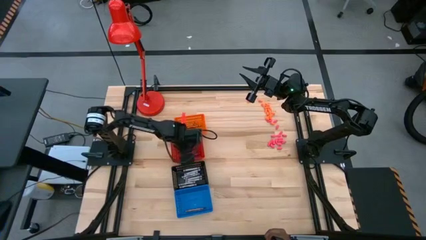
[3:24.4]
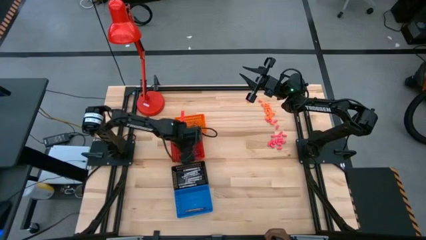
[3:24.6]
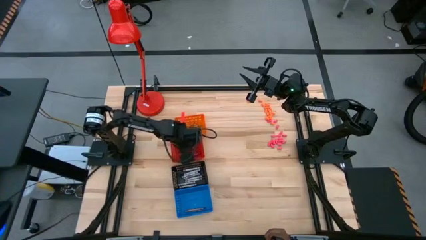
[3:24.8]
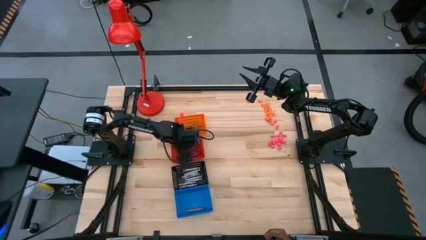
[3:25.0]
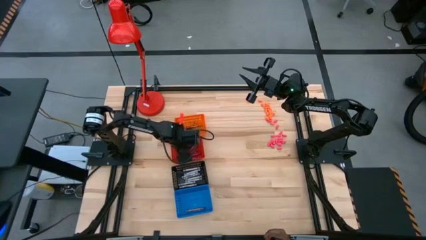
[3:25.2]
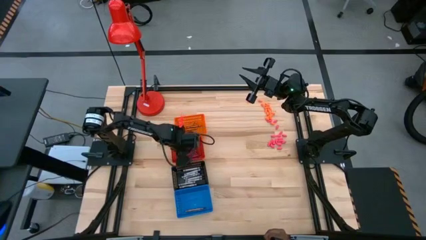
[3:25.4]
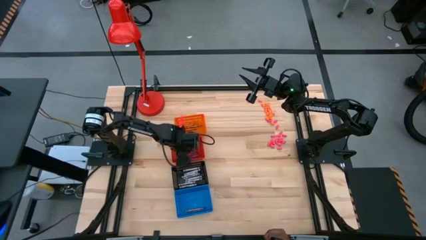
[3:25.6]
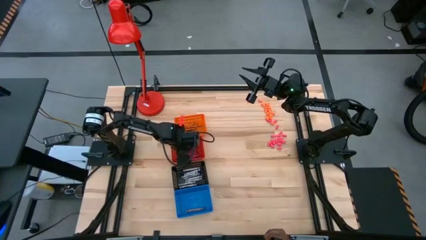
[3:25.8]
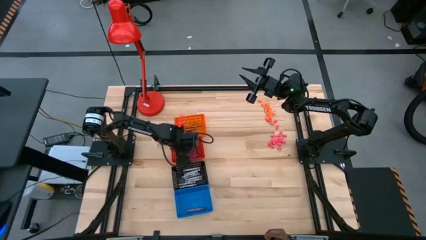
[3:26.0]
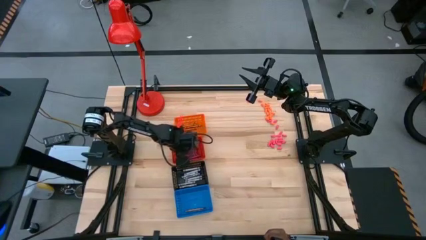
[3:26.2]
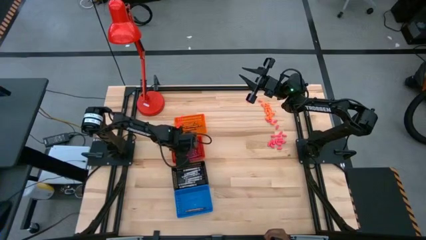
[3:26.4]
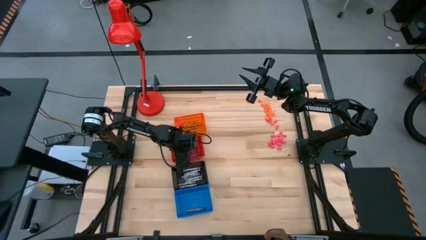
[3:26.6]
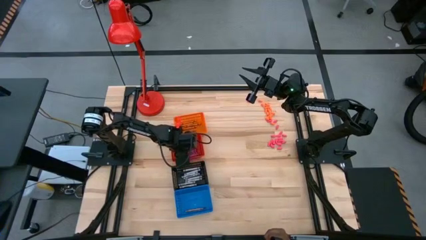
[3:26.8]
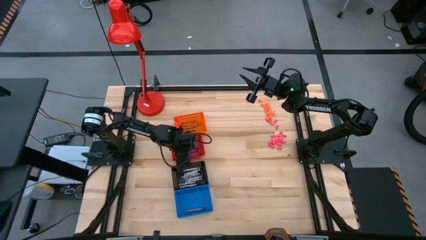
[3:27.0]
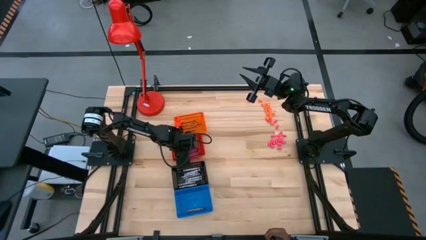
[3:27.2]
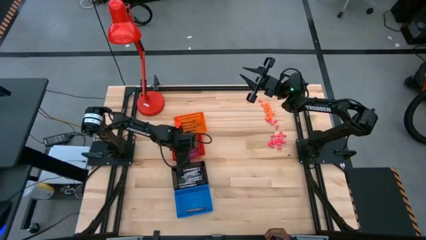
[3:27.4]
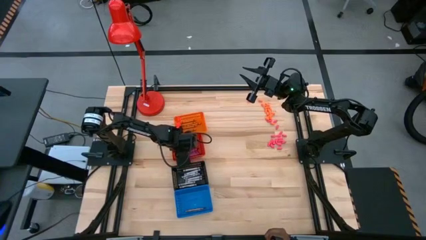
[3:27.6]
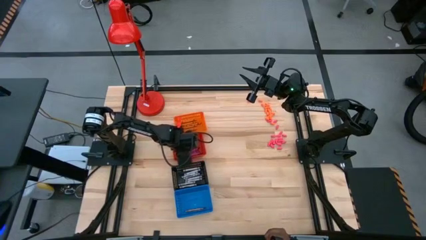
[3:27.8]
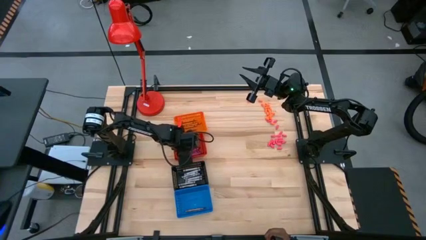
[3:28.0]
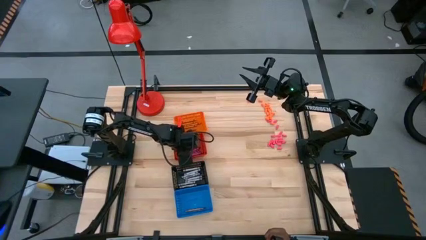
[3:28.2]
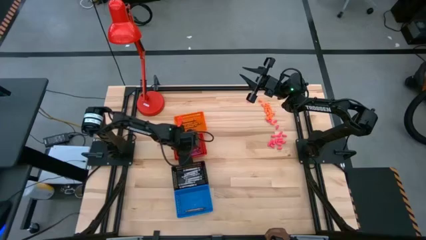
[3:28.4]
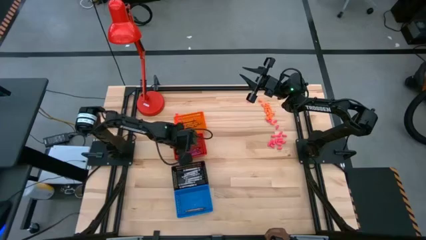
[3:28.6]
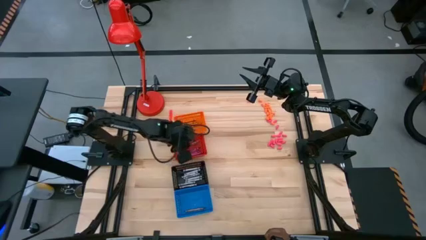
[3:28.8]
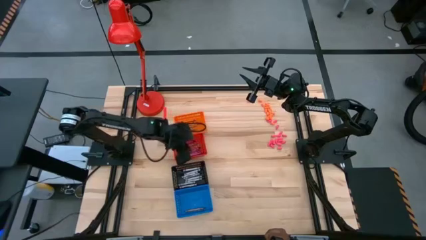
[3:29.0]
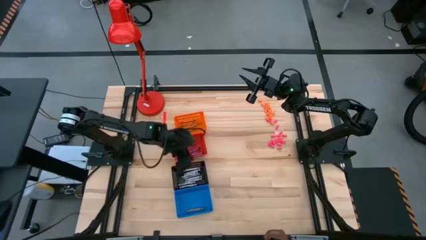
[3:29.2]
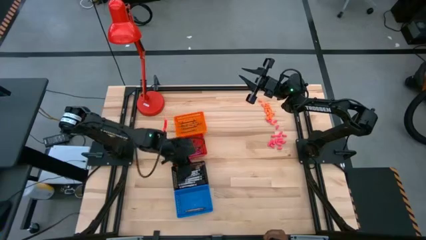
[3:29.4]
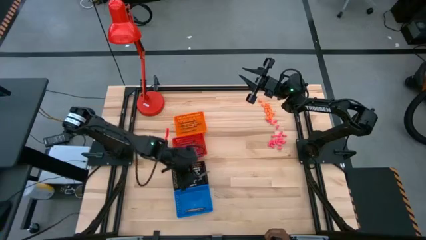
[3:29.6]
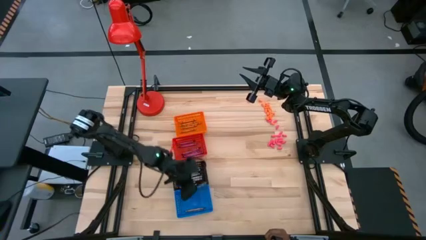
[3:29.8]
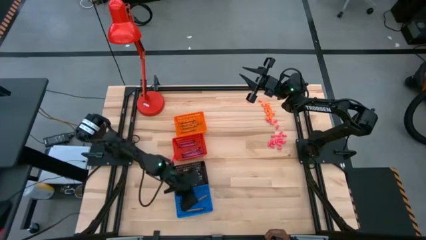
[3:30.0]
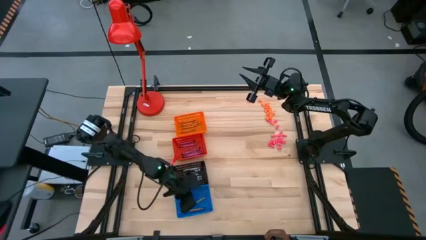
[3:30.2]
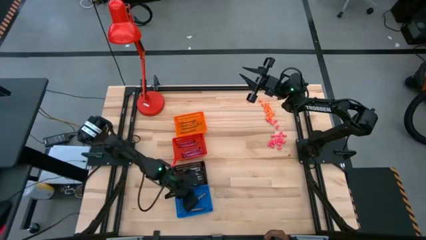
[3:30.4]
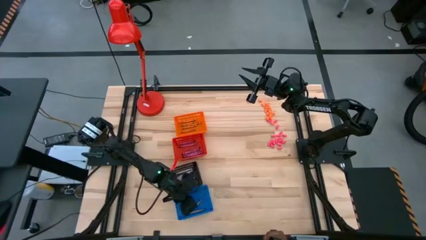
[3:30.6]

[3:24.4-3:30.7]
Task: Sort crayons
Put the brown crayon into the blue basket

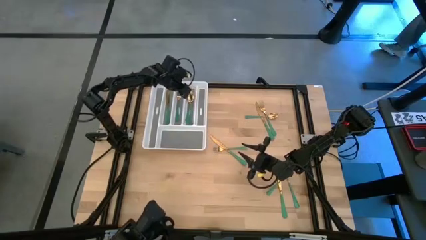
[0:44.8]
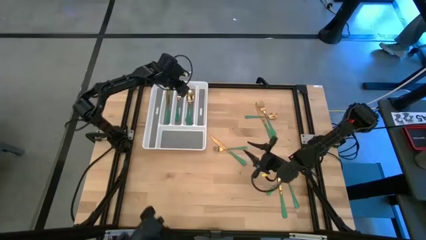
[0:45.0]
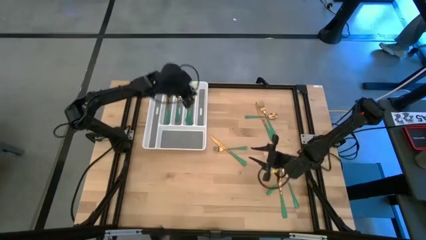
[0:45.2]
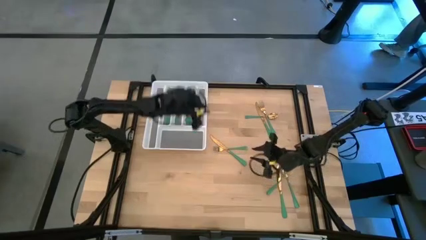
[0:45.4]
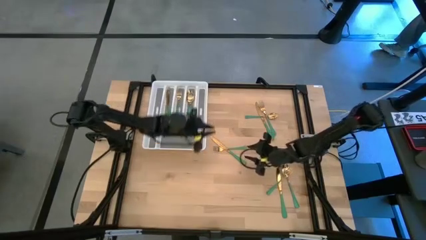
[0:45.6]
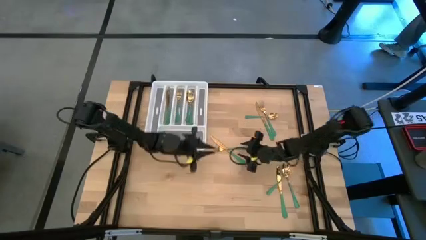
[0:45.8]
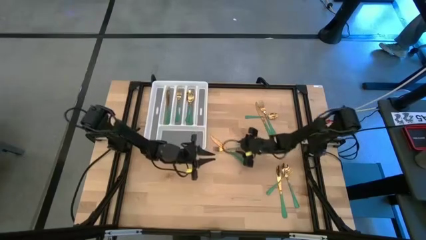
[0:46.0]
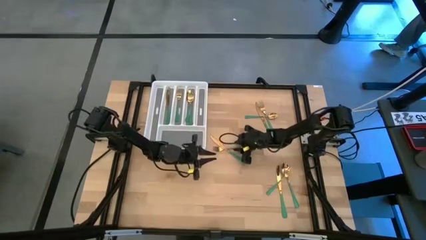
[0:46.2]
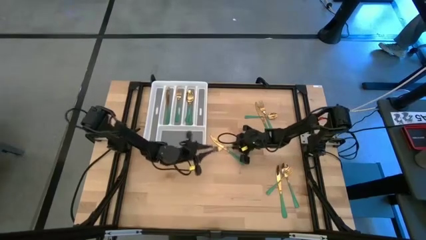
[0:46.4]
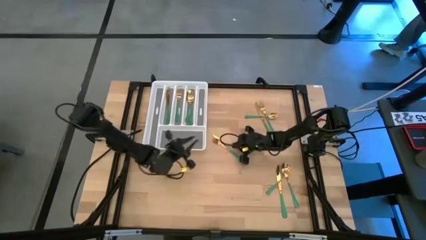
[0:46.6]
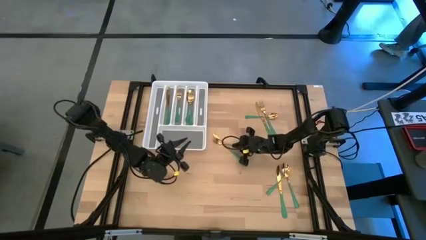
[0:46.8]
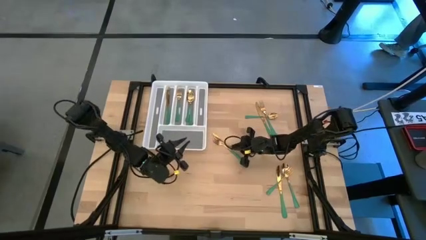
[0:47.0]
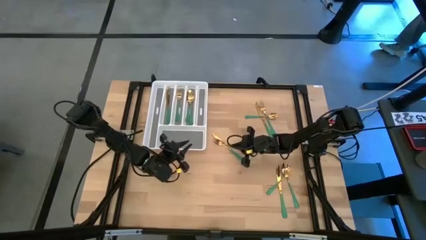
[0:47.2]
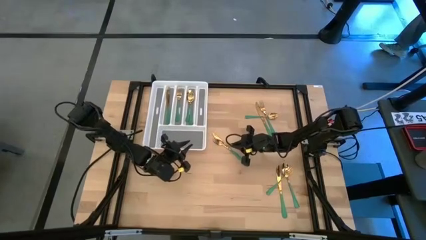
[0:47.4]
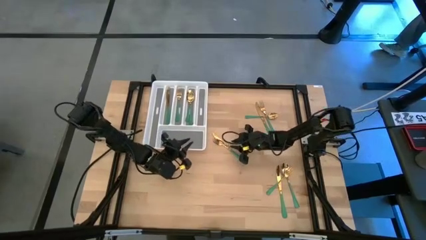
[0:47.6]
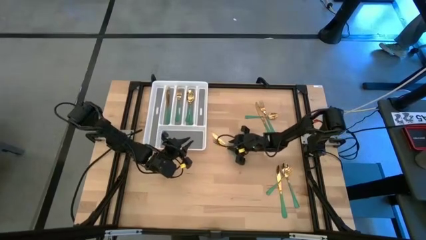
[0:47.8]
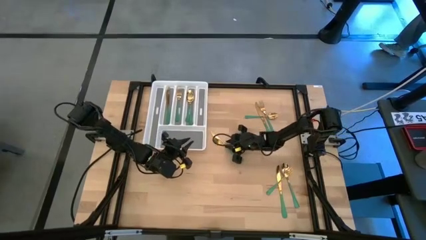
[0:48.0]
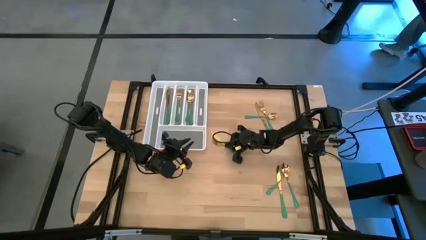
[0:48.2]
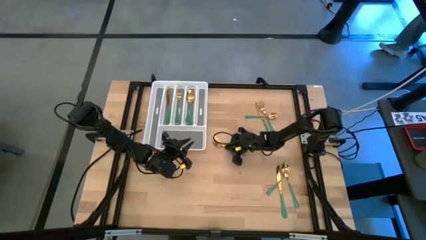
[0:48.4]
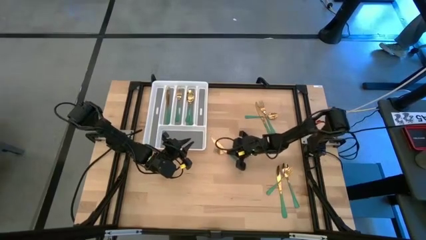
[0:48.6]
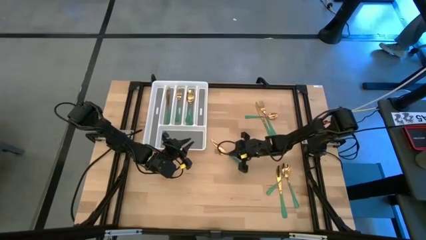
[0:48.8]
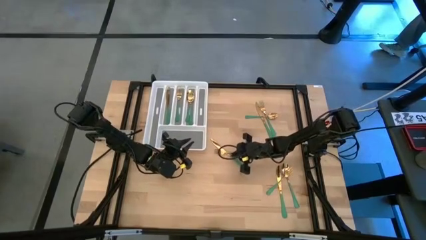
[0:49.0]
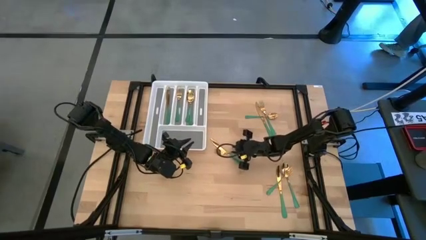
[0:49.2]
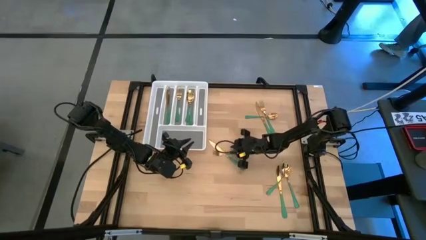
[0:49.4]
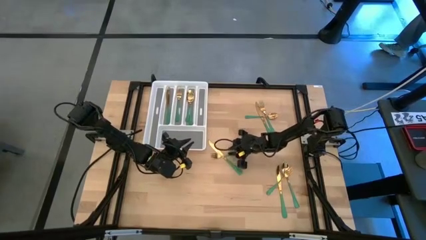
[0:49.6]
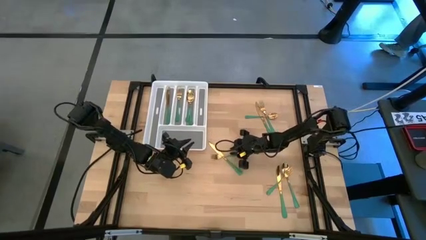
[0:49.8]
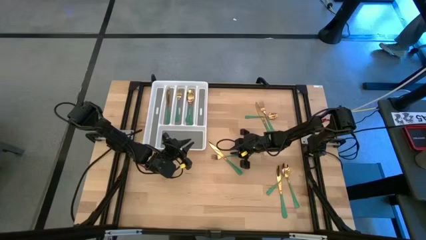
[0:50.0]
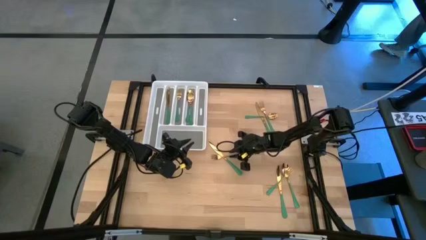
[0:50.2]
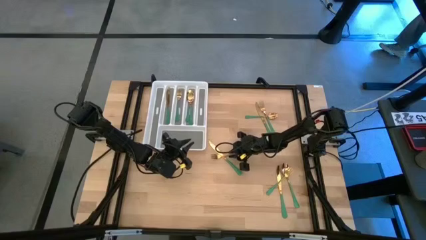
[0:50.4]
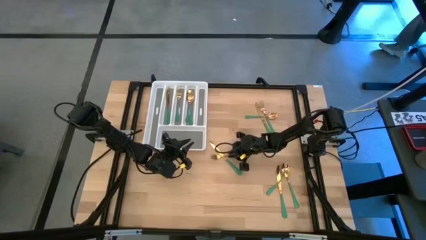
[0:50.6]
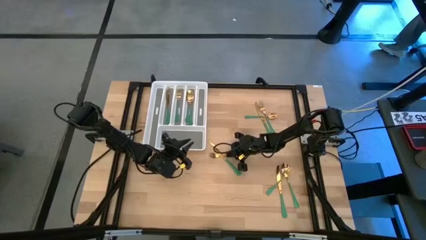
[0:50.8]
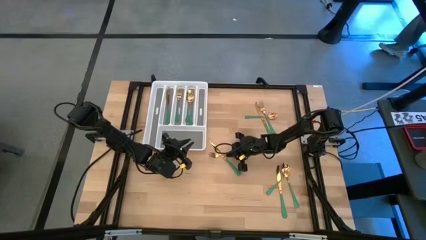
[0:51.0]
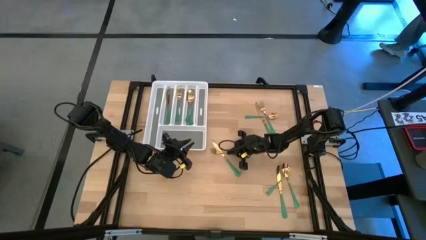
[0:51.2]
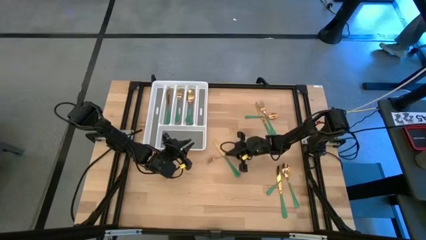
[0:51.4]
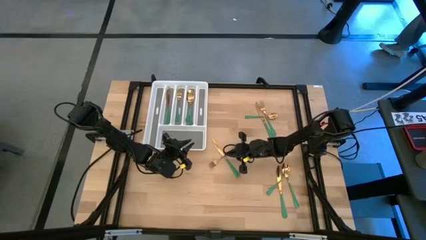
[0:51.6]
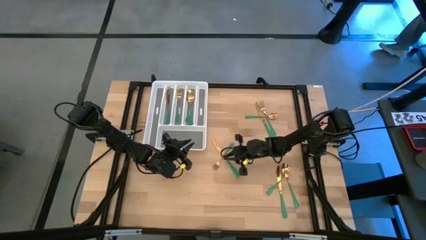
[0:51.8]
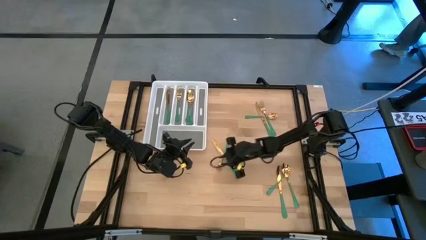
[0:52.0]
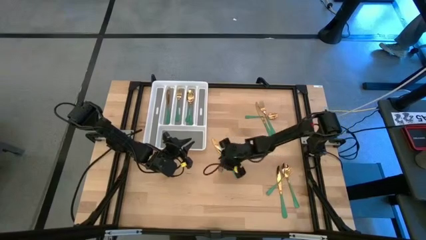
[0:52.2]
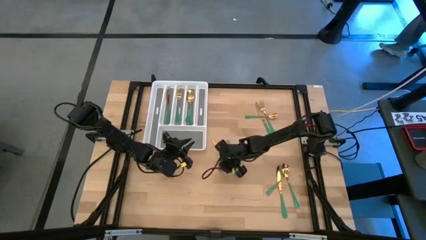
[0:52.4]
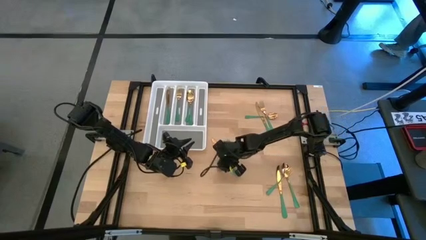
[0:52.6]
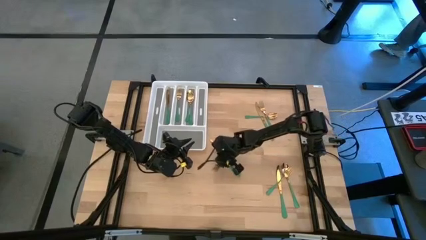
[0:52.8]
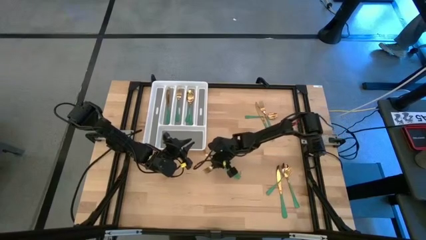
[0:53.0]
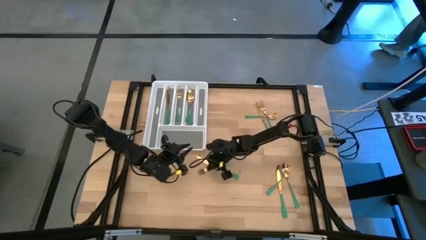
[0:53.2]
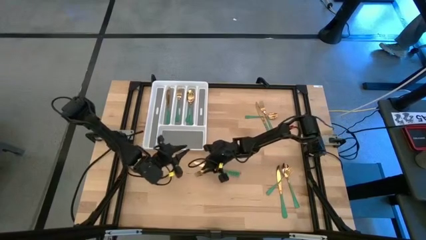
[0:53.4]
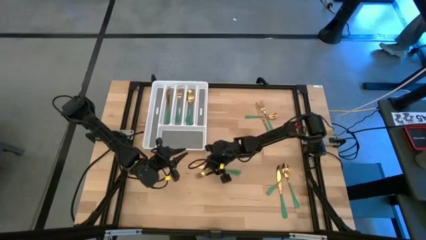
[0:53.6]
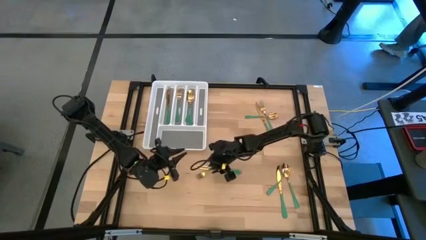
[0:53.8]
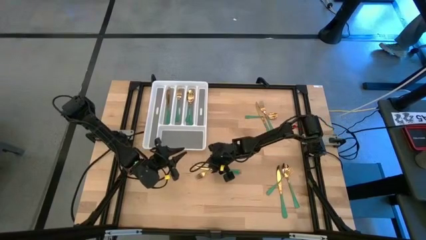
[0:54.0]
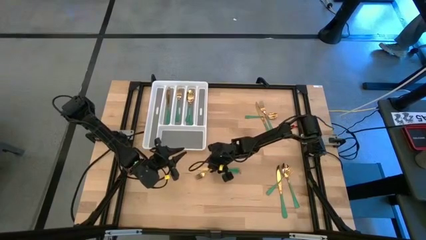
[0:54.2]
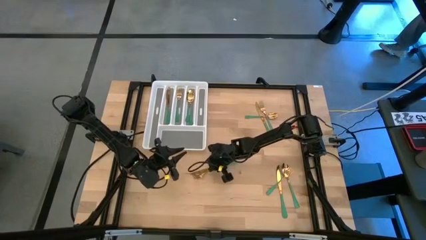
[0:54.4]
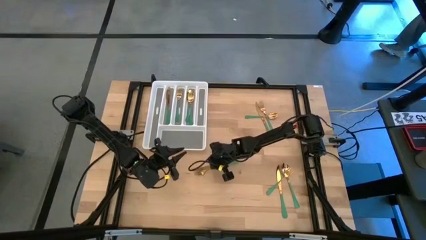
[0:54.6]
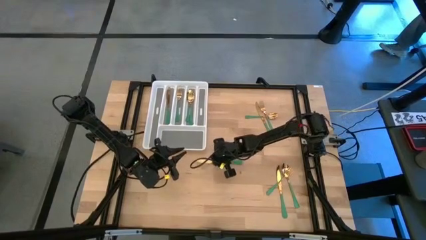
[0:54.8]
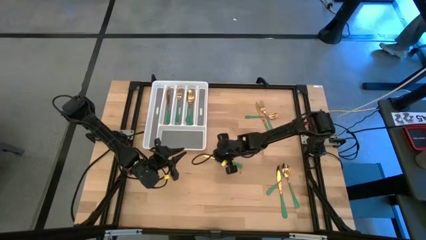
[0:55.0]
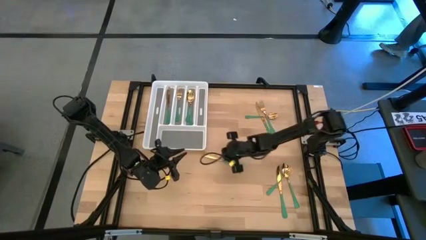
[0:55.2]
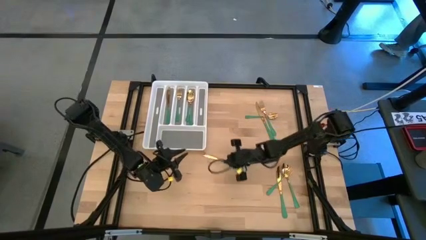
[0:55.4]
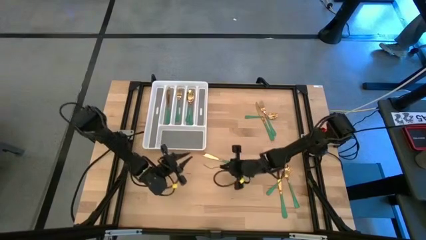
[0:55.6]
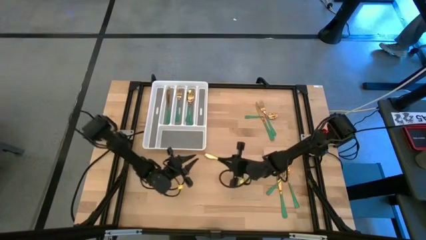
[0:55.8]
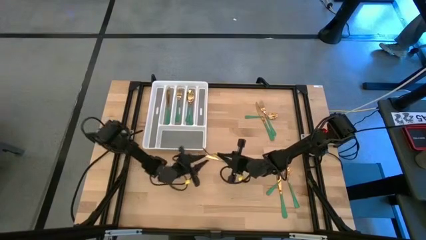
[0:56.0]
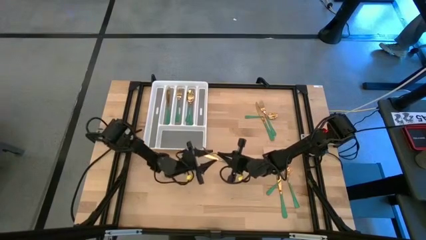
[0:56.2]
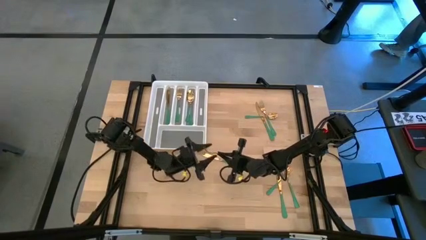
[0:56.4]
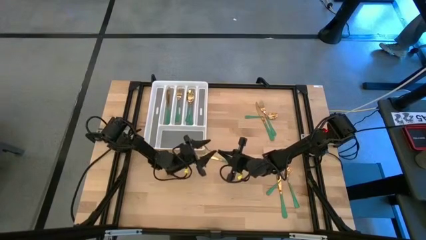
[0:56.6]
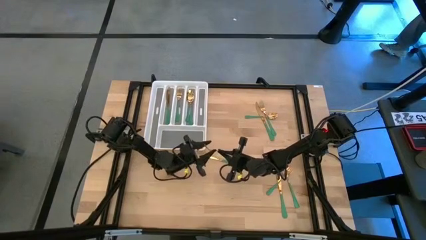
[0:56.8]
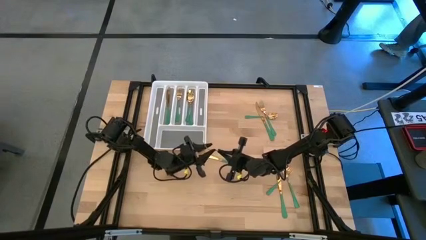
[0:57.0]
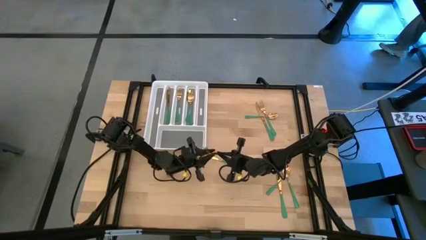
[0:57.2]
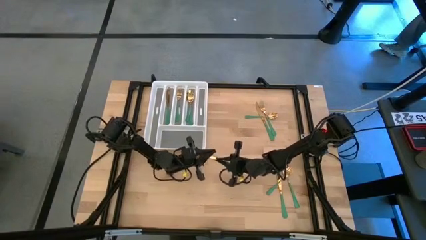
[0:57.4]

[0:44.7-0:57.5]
Task: Sort silverware
Put the green fork into the white cutlery tray
